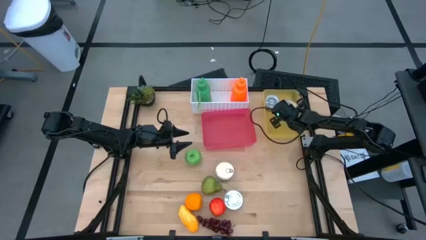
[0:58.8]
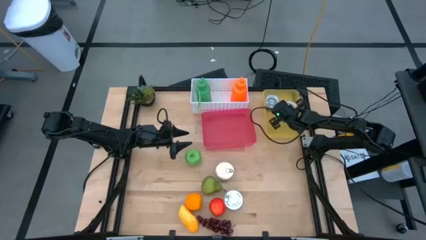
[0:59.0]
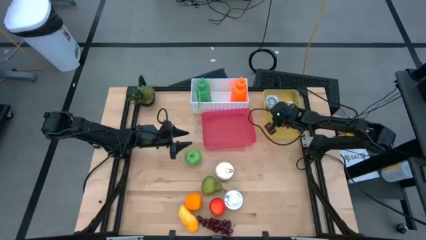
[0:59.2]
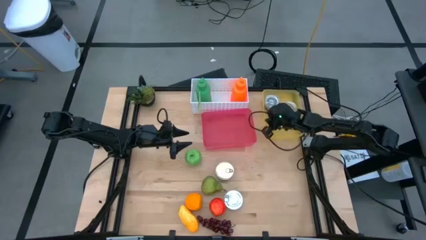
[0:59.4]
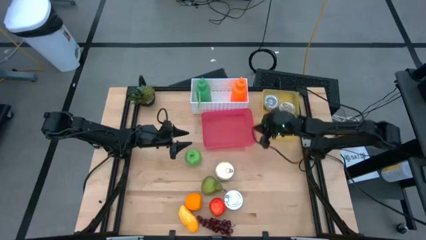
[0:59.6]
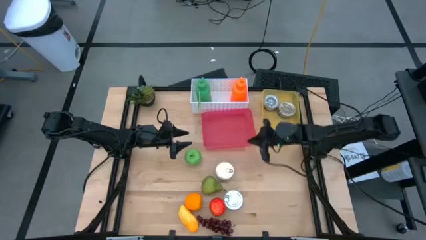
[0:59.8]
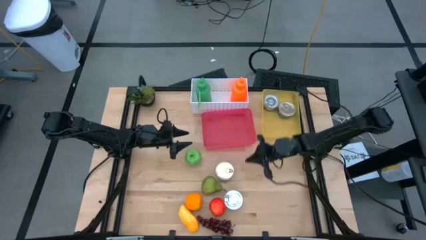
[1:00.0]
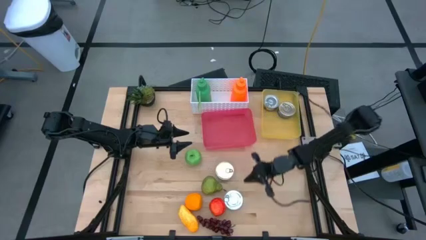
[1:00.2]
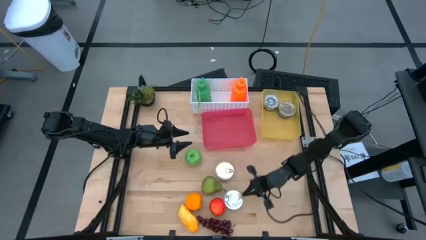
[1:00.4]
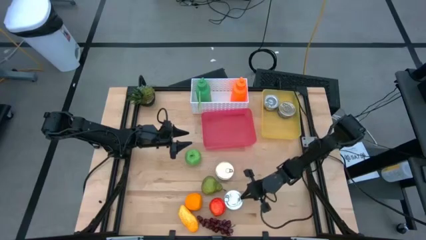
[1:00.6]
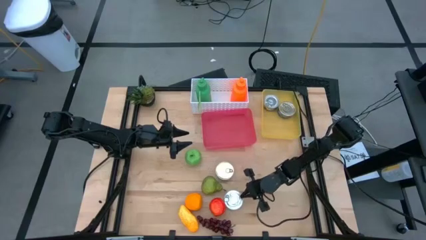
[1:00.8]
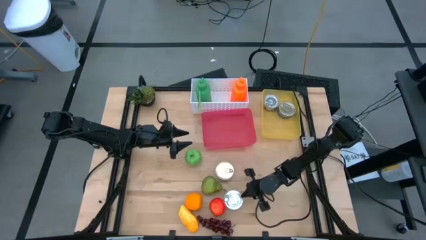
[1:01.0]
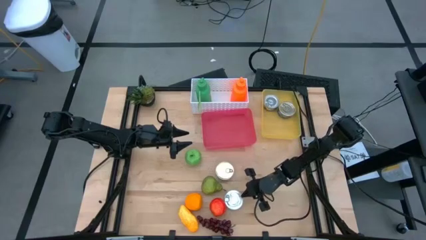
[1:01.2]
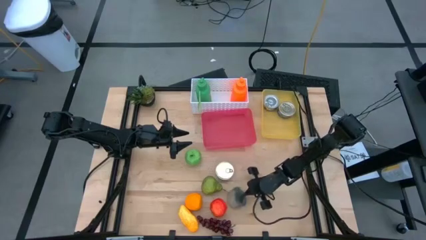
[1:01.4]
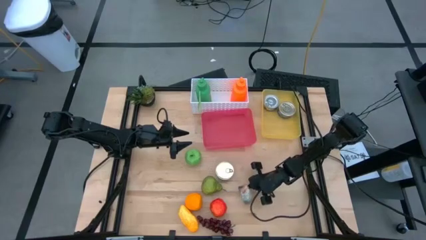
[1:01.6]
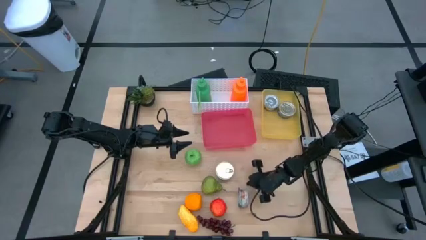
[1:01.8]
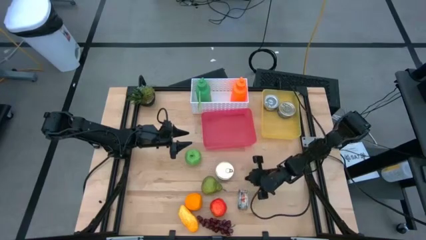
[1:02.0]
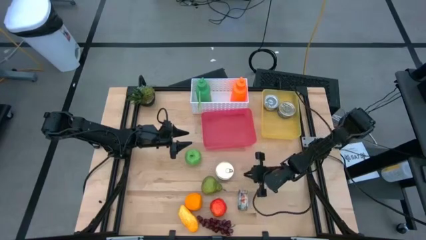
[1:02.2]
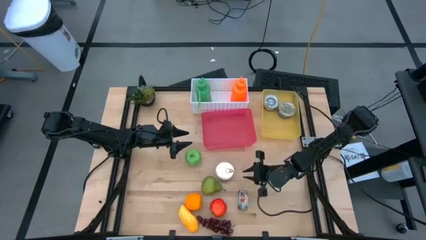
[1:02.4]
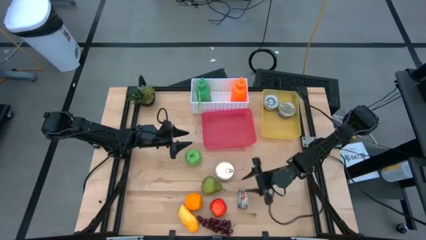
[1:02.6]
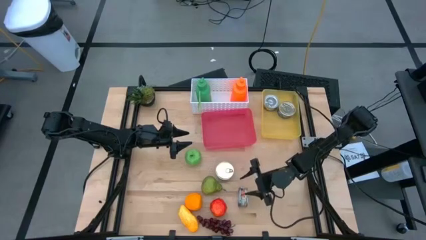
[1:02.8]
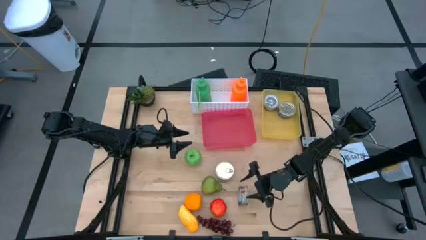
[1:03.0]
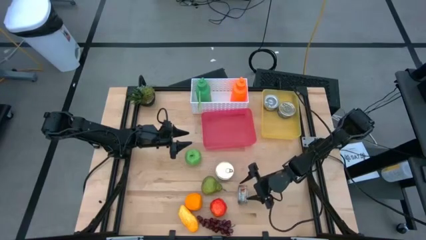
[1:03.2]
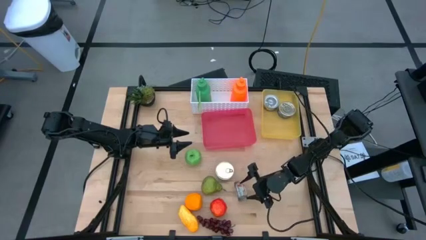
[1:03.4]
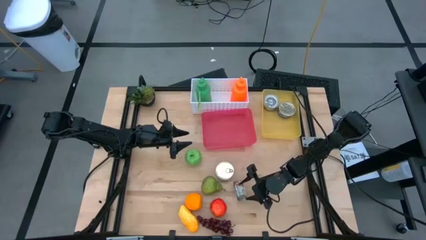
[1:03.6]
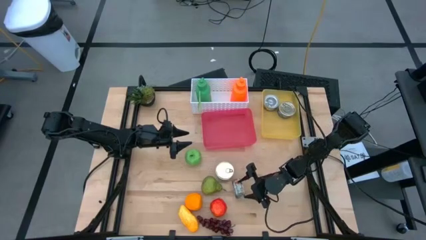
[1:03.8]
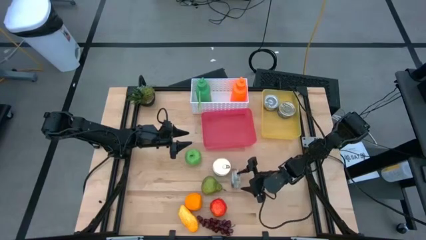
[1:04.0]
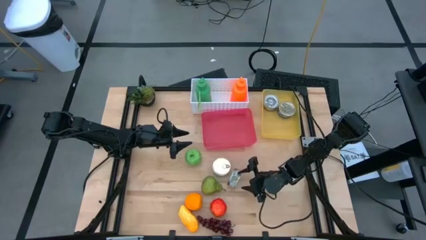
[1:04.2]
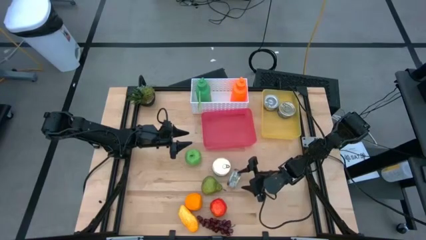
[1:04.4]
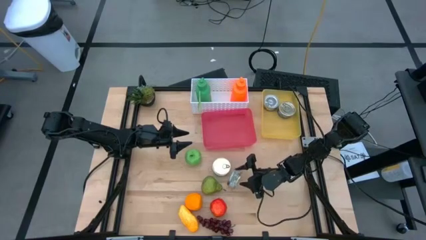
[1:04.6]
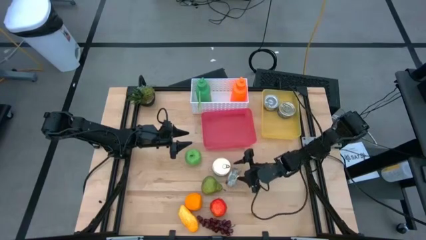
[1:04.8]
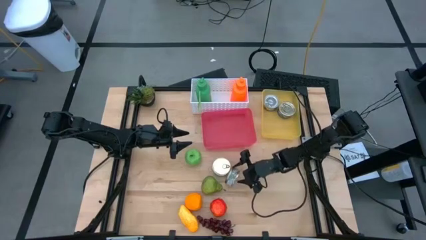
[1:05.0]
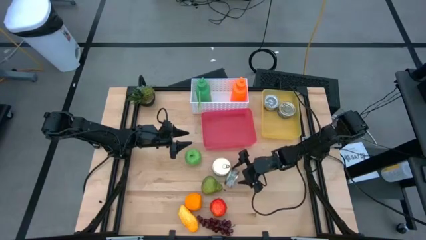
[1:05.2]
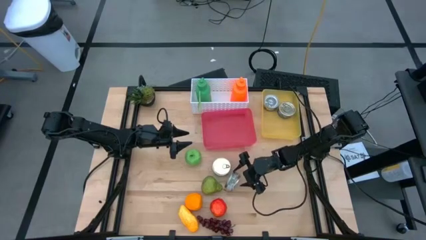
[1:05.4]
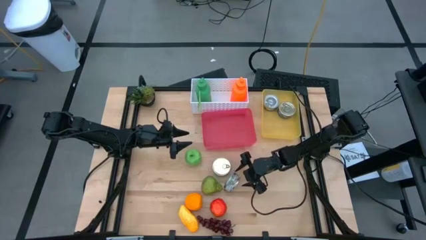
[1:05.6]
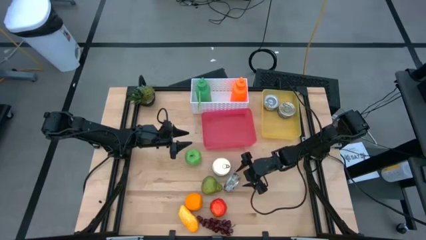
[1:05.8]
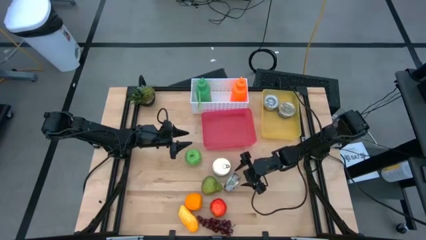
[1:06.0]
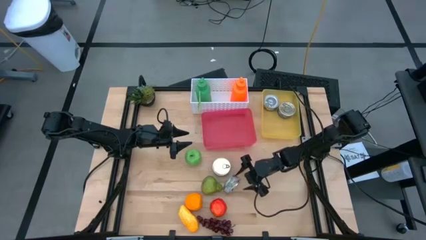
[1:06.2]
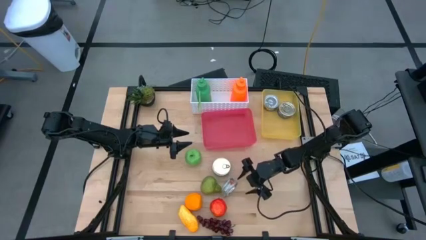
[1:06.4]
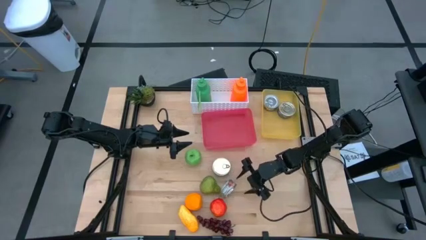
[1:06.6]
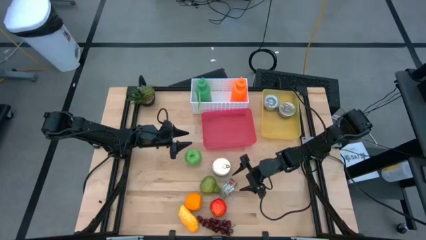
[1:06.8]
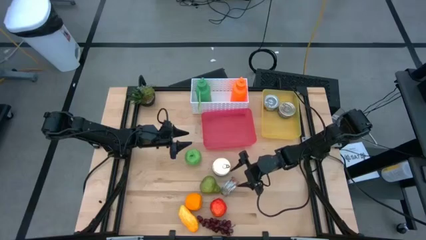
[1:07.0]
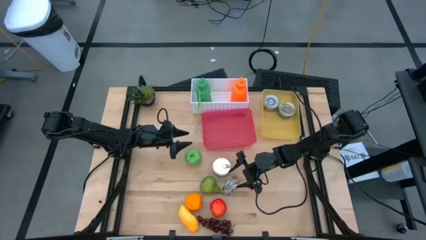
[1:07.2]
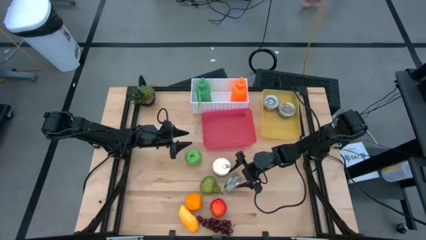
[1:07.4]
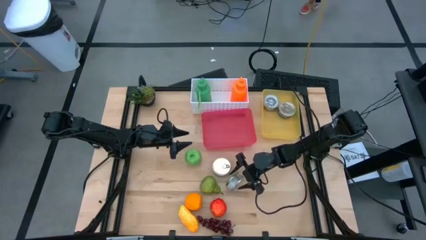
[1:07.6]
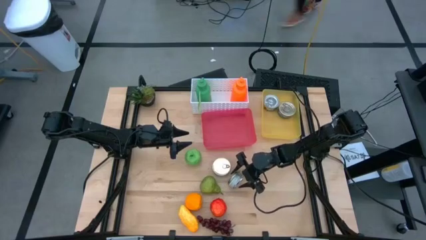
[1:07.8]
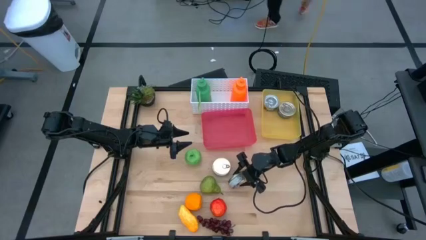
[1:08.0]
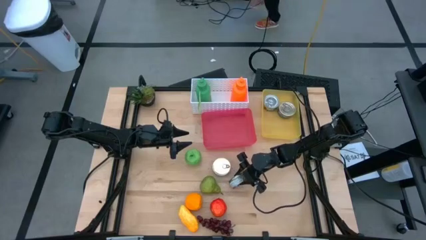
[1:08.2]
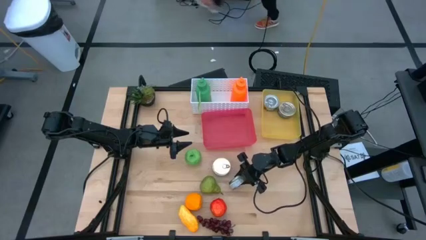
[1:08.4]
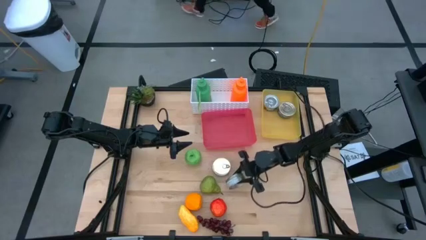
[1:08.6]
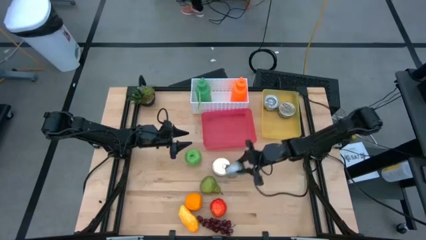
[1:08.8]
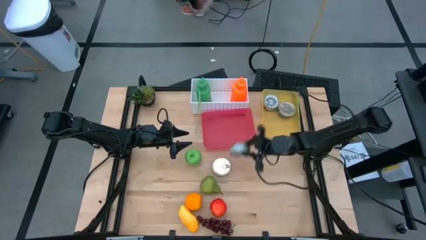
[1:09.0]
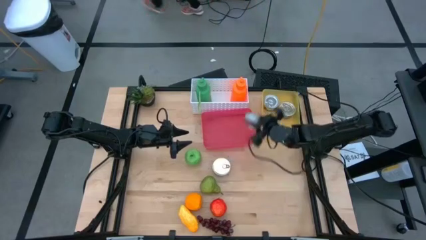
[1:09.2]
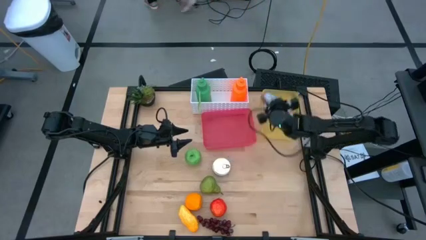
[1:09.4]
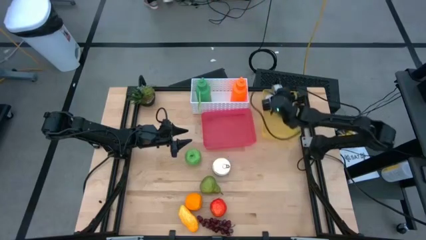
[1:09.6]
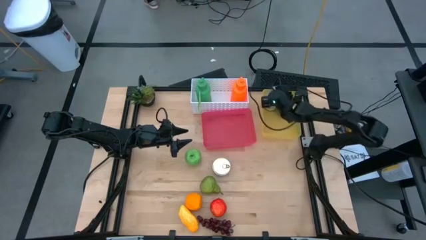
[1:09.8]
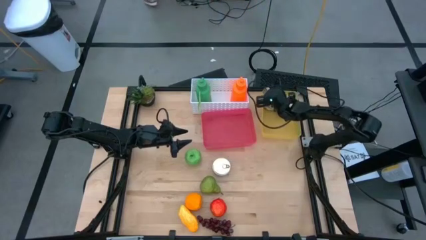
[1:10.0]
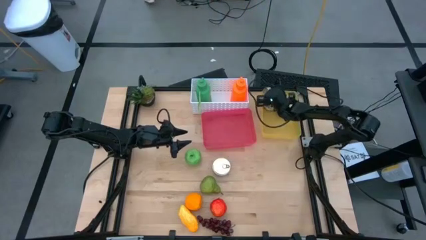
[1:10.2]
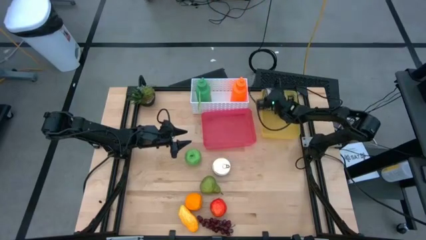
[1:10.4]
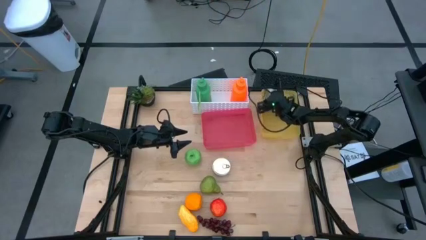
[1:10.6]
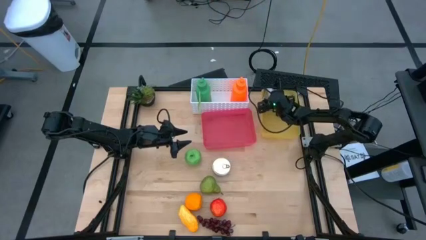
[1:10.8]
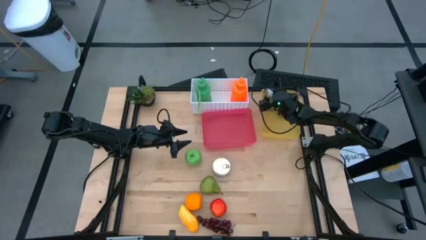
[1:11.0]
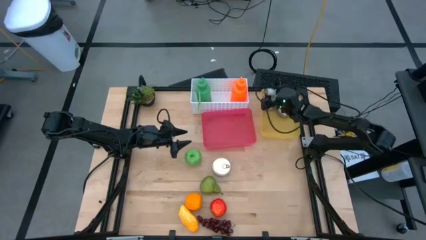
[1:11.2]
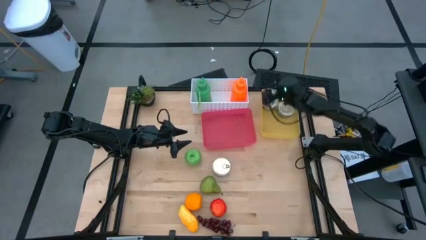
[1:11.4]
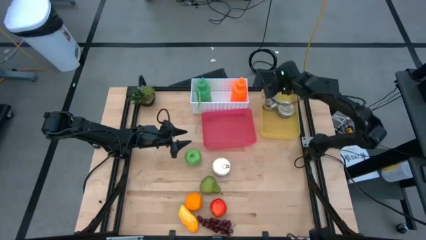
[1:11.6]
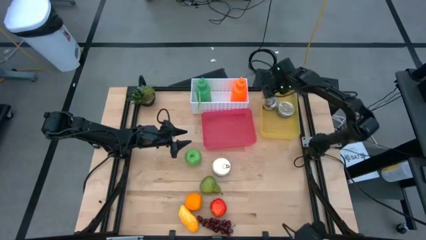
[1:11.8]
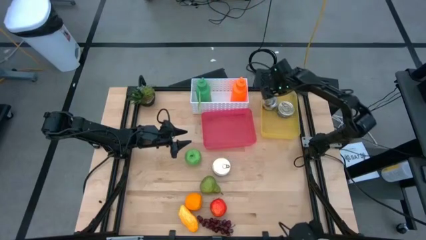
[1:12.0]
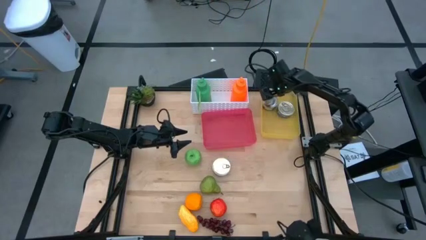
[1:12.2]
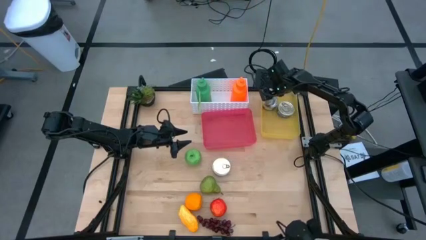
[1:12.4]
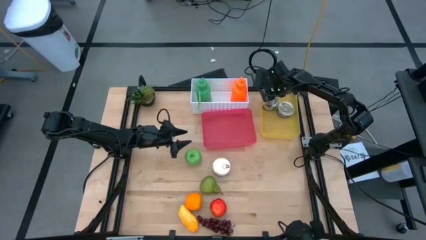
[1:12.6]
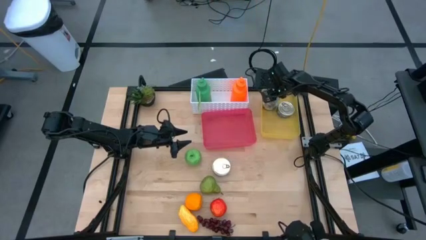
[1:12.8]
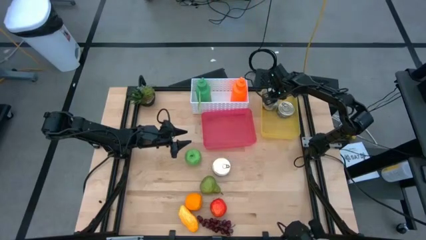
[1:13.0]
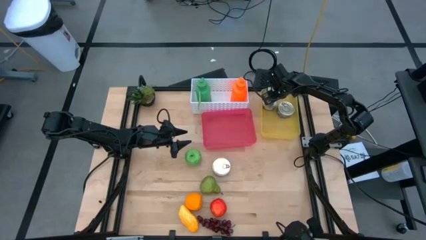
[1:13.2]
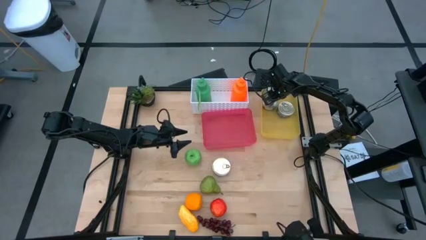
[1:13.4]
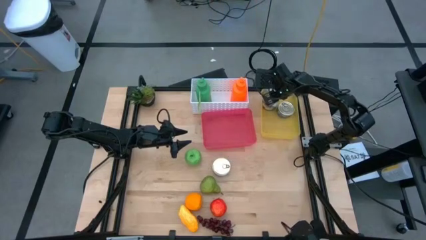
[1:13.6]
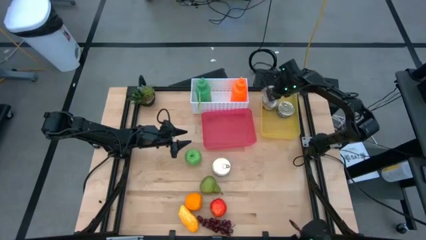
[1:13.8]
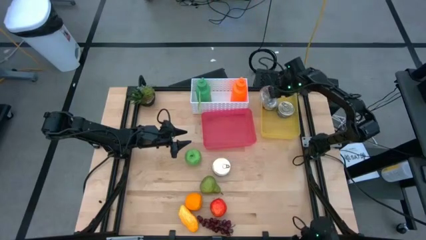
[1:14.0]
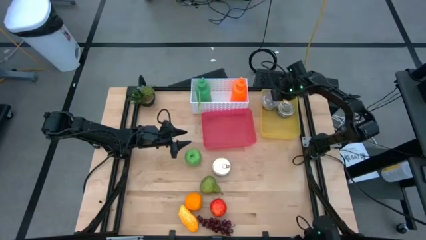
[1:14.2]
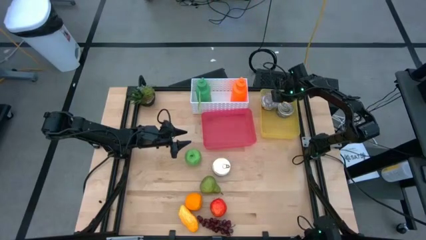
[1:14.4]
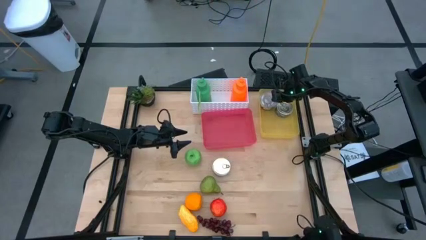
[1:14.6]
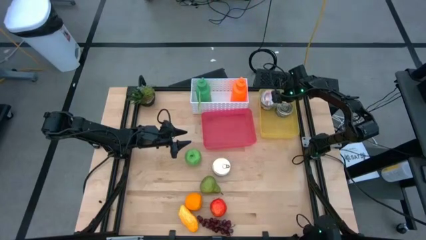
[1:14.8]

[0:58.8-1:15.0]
Task: Pick & Place Food Item
Put the green tuna can into the yellow bin
